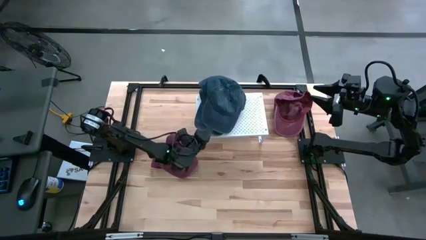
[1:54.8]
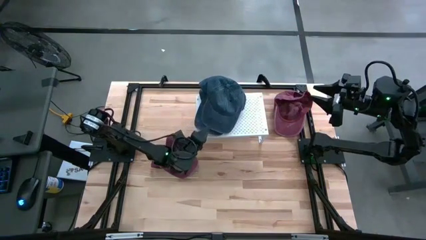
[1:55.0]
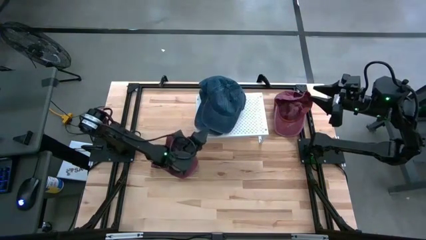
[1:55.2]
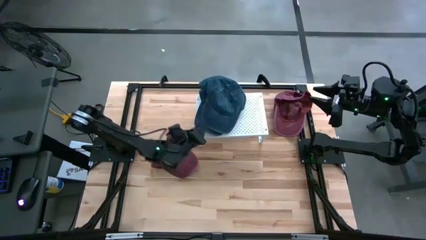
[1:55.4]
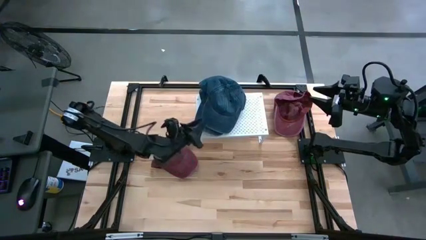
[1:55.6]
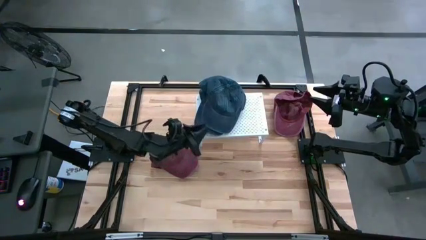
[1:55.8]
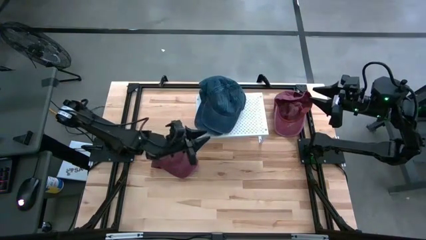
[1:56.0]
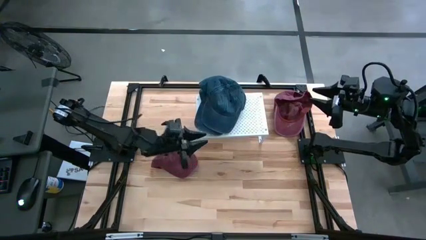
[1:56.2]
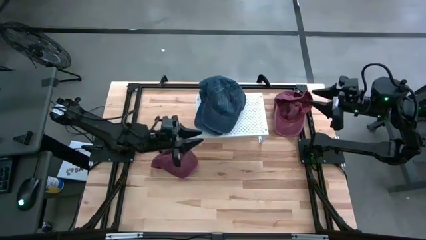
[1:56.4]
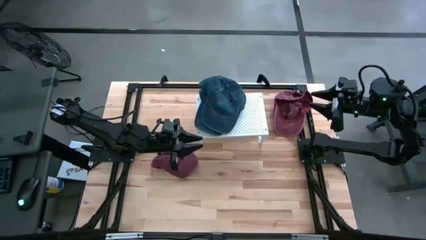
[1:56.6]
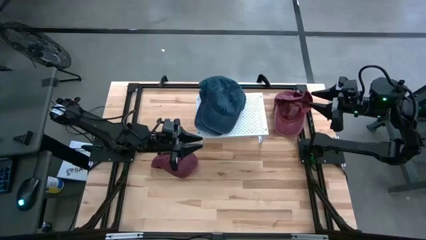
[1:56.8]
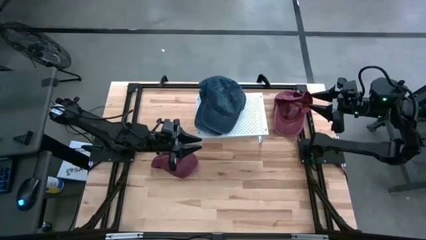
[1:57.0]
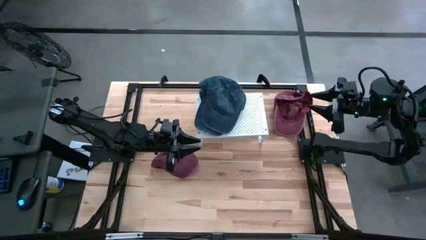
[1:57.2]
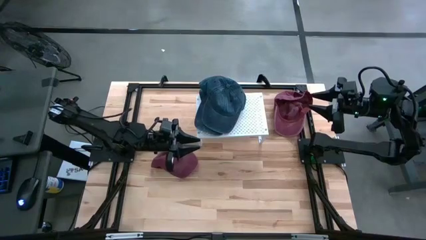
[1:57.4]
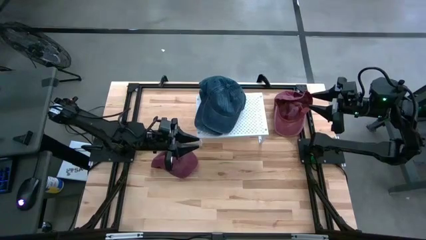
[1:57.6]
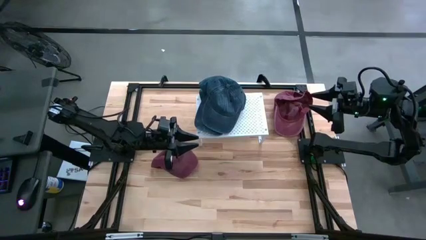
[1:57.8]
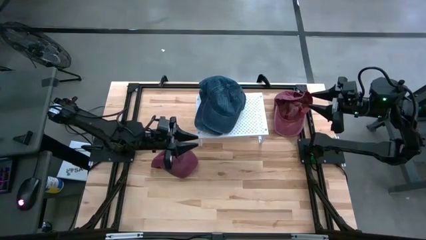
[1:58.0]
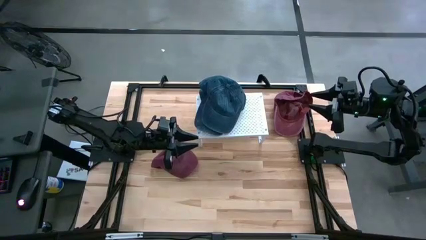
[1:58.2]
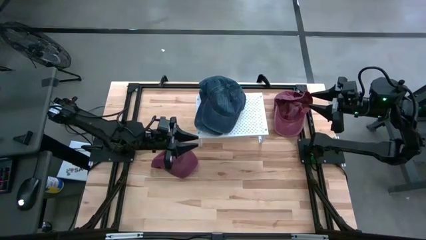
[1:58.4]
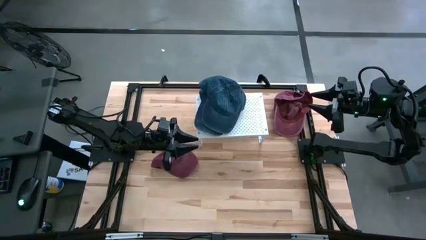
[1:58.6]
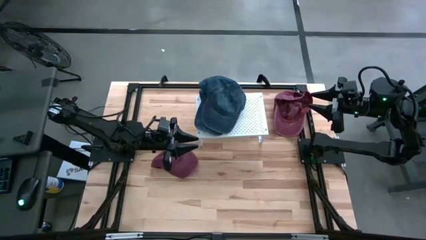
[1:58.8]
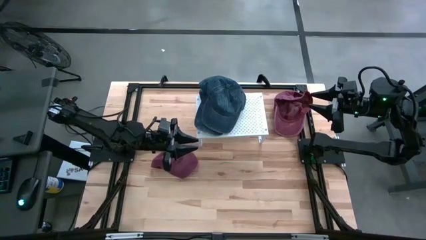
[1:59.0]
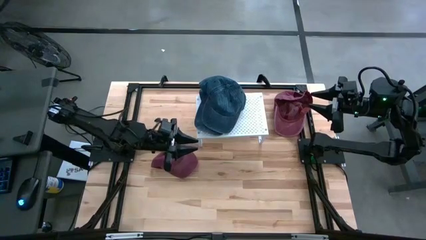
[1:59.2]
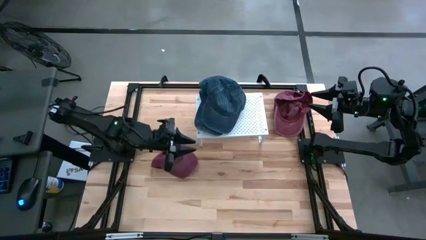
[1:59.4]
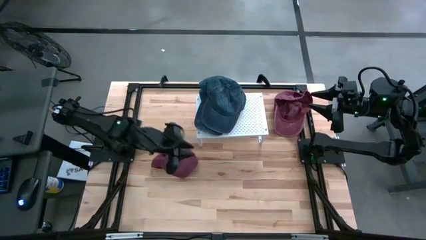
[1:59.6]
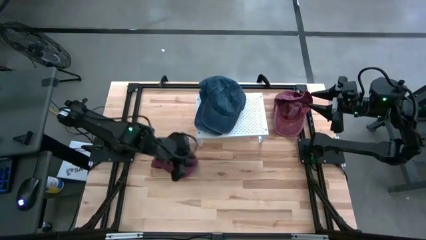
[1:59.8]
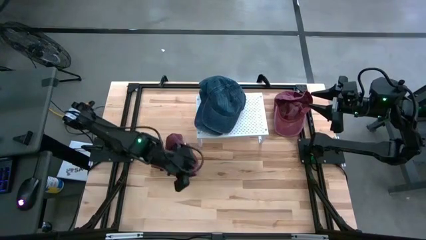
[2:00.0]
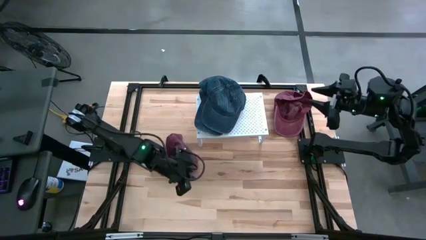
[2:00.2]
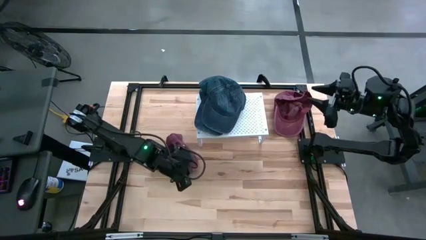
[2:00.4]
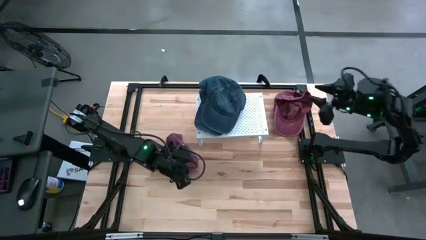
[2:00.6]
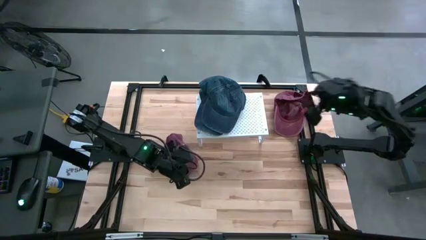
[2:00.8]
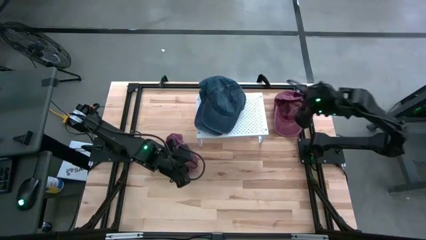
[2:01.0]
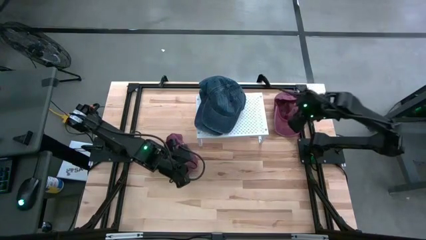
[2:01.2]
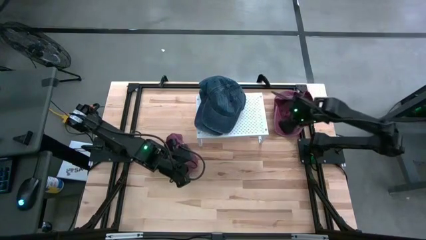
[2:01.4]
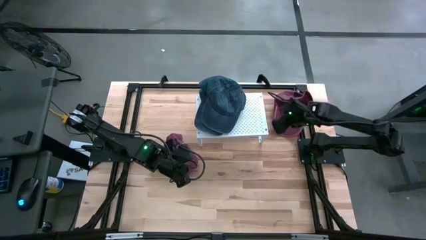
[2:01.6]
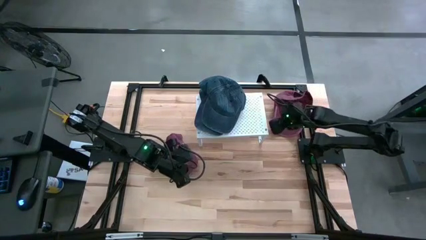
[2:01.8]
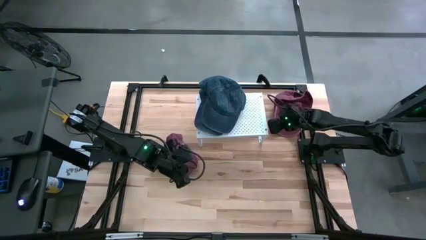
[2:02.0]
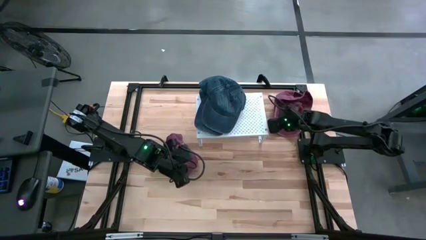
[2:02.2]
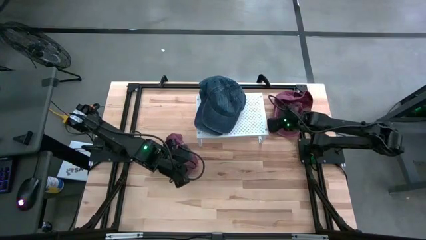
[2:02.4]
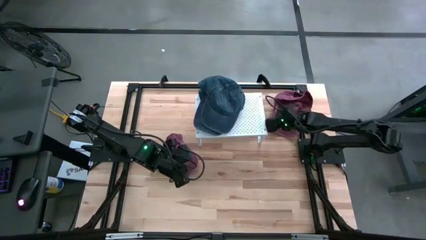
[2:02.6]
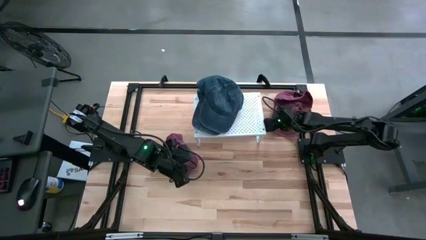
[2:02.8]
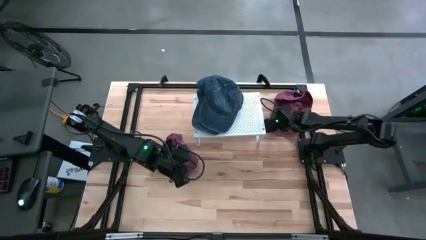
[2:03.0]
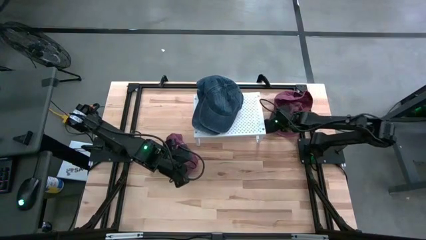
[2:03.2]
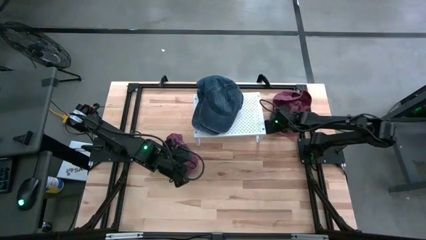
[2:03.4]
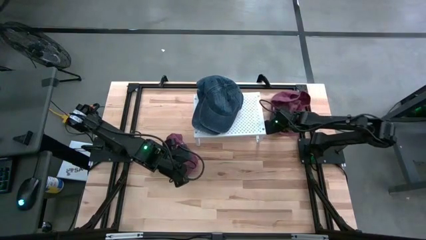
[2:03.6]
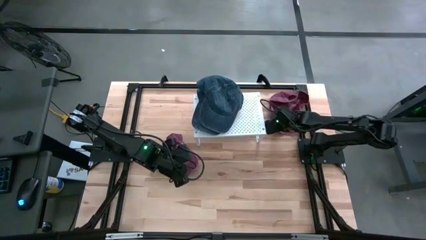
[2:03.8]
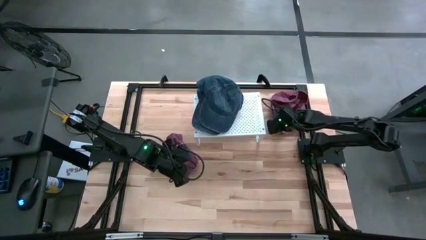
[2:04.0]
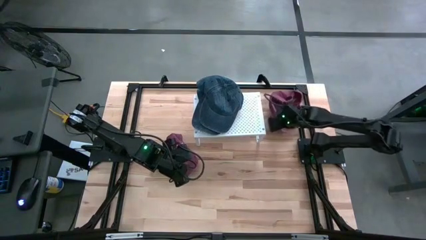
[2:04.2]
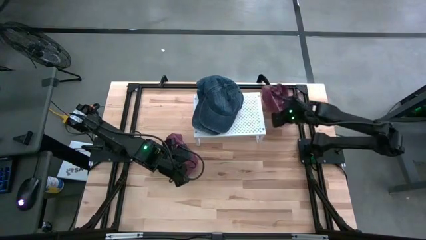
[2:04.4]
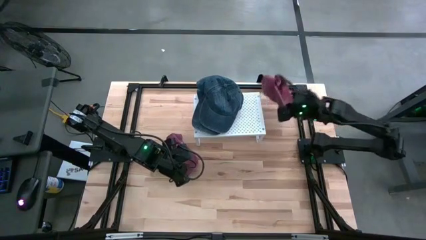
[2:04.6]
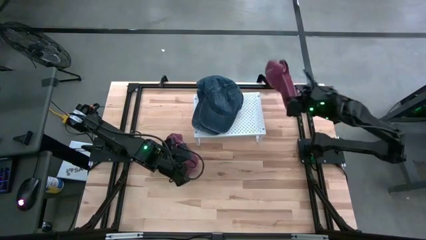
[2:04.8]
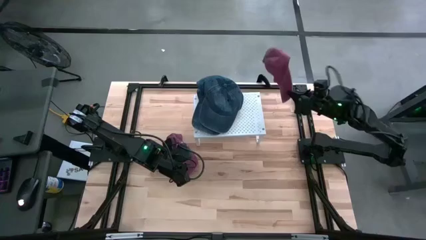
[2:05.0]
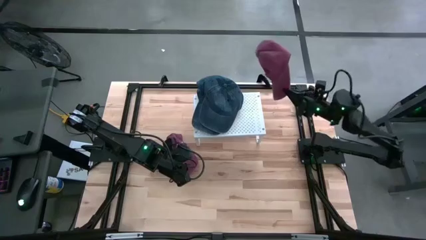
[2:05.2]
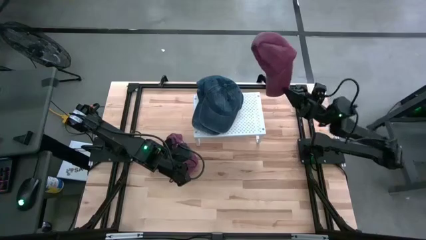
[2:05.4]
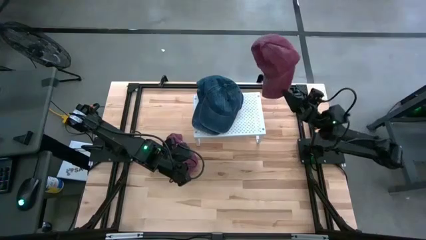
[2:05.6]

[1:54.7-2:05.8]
Task: Pick & Place hat
Put the right red cap on the shelf
